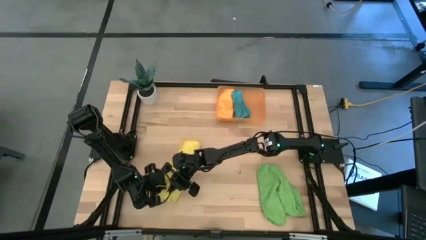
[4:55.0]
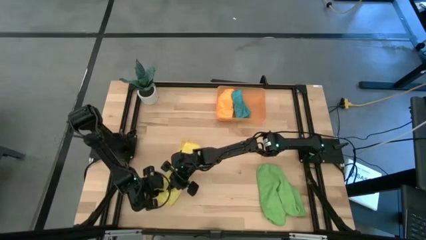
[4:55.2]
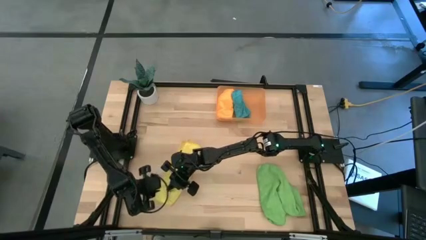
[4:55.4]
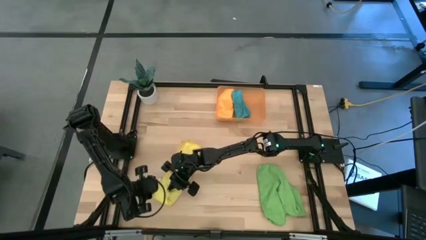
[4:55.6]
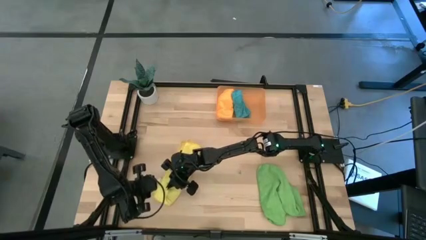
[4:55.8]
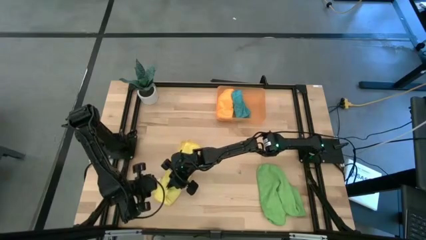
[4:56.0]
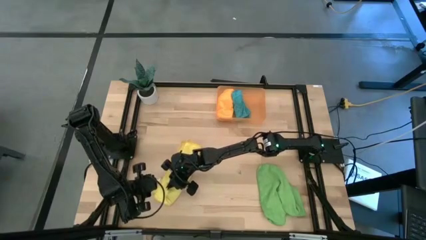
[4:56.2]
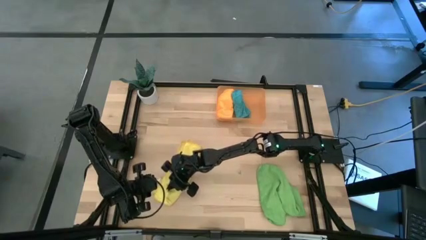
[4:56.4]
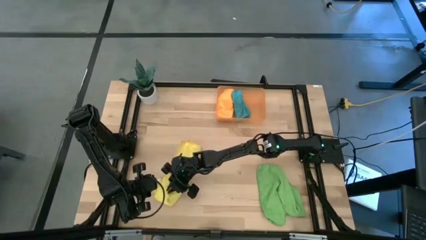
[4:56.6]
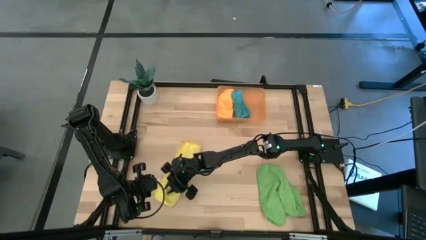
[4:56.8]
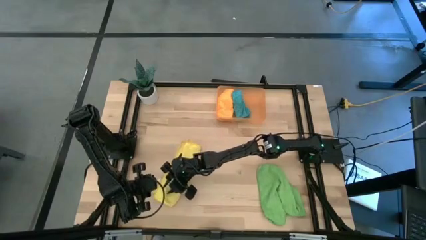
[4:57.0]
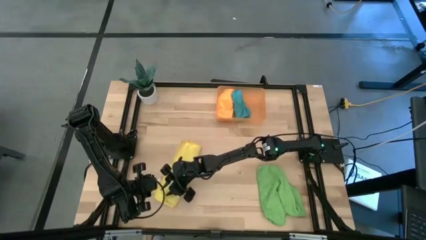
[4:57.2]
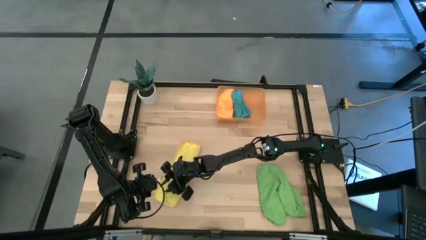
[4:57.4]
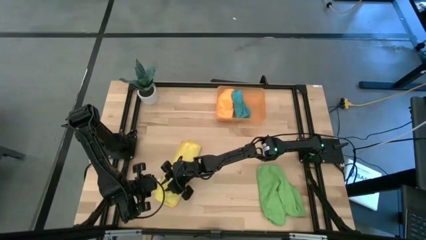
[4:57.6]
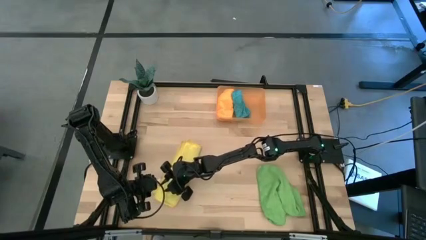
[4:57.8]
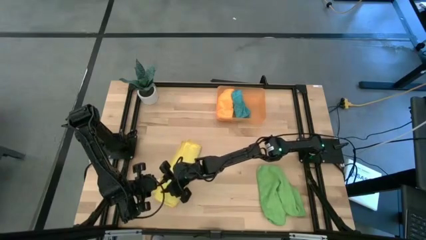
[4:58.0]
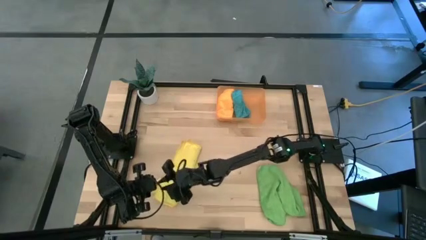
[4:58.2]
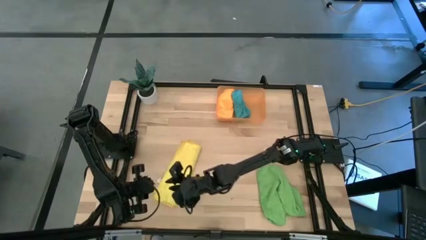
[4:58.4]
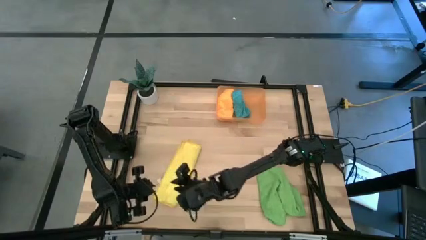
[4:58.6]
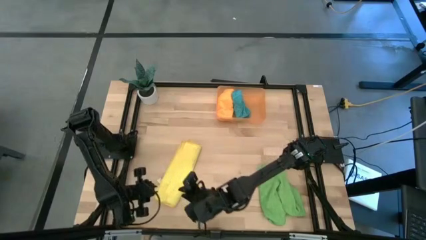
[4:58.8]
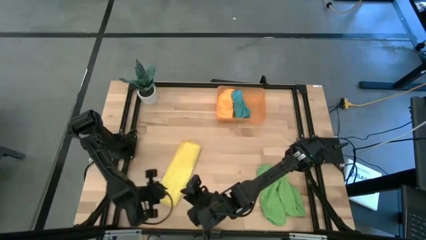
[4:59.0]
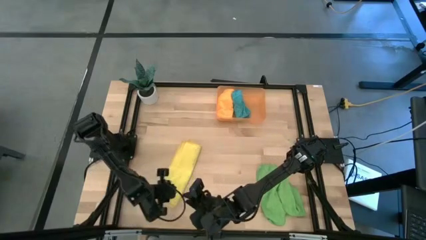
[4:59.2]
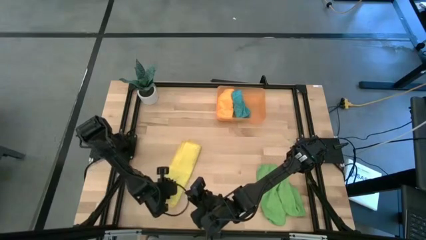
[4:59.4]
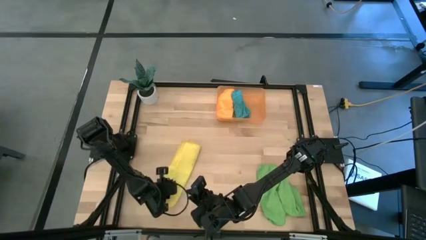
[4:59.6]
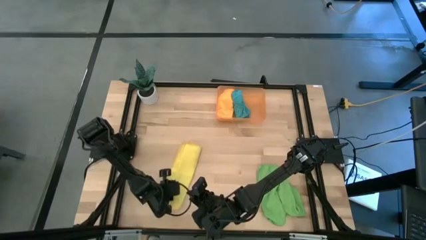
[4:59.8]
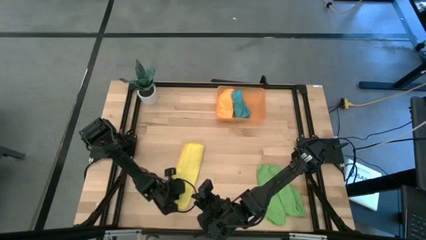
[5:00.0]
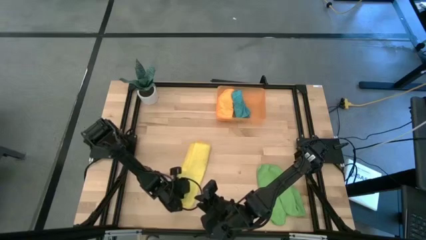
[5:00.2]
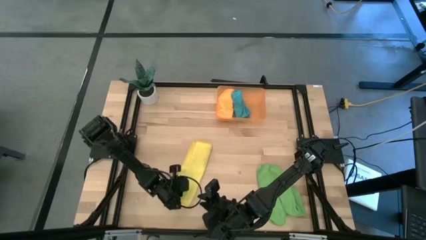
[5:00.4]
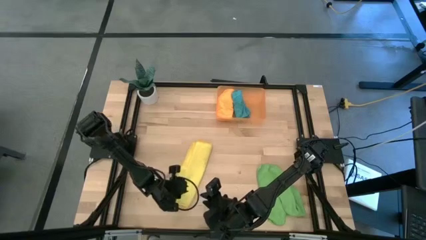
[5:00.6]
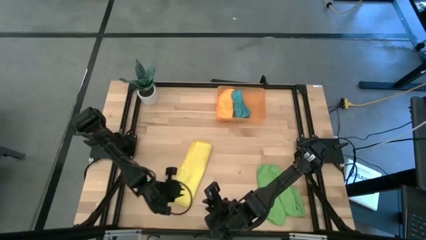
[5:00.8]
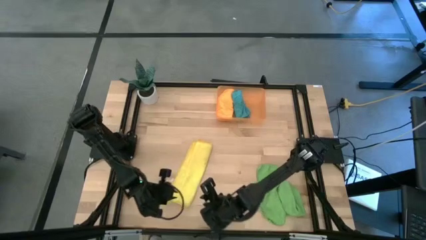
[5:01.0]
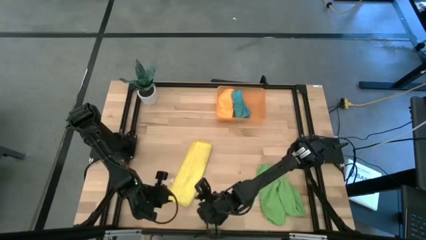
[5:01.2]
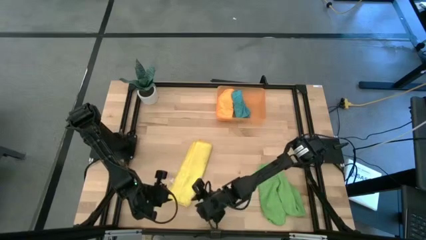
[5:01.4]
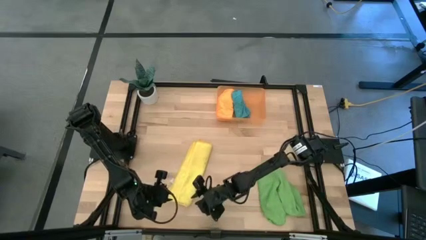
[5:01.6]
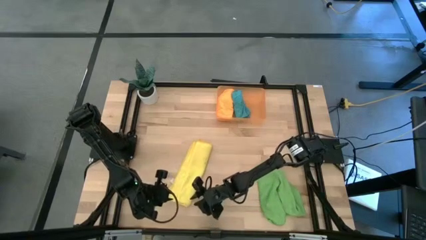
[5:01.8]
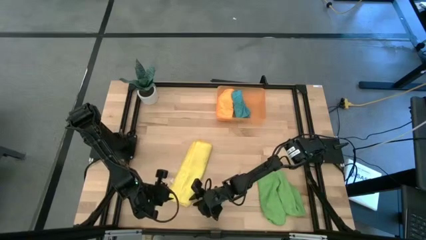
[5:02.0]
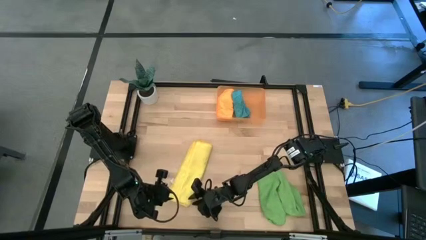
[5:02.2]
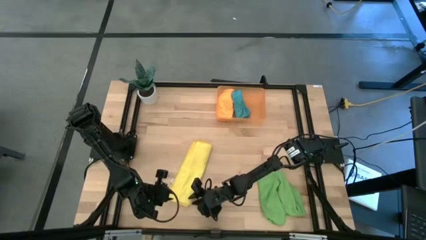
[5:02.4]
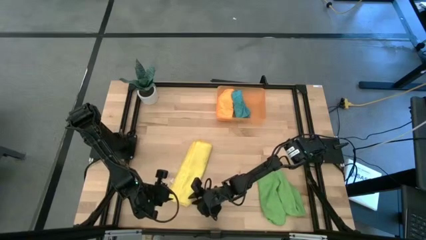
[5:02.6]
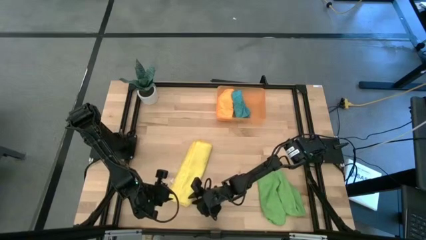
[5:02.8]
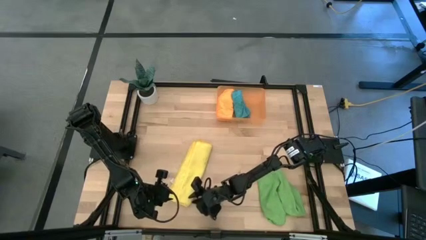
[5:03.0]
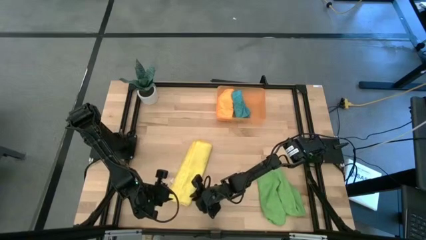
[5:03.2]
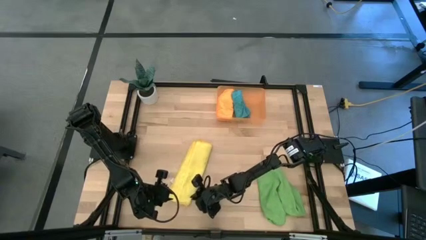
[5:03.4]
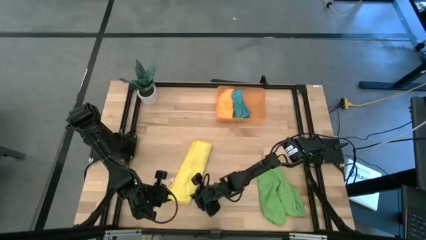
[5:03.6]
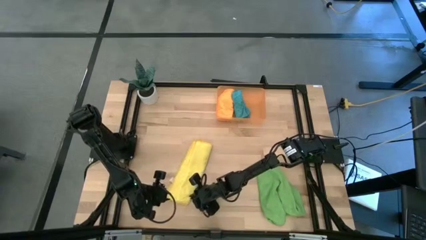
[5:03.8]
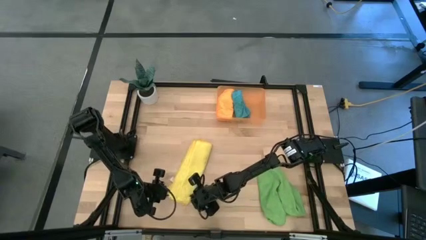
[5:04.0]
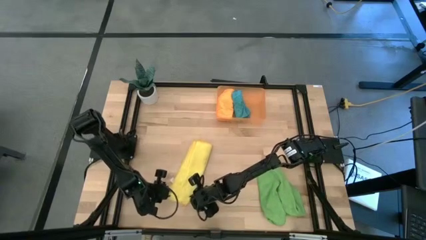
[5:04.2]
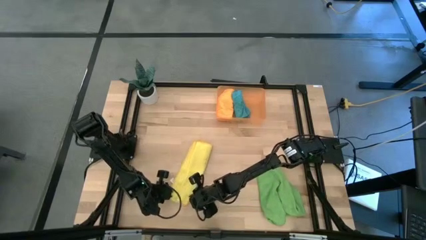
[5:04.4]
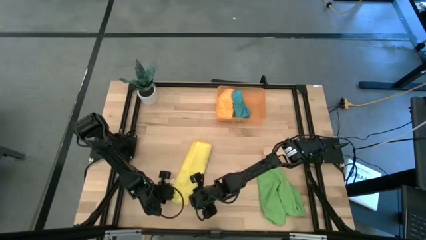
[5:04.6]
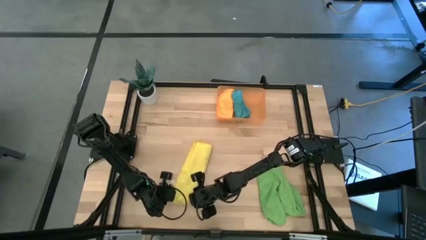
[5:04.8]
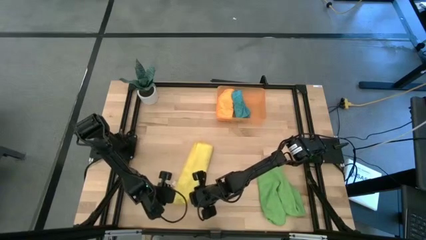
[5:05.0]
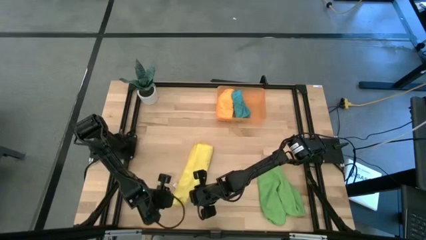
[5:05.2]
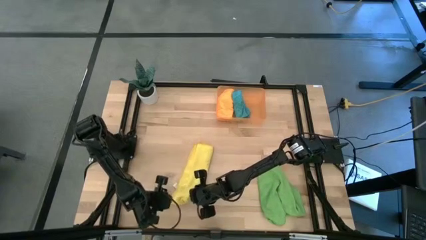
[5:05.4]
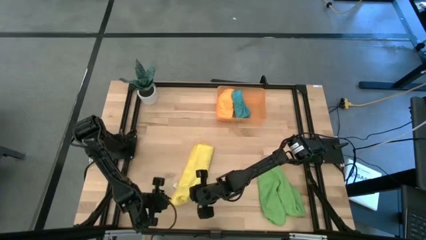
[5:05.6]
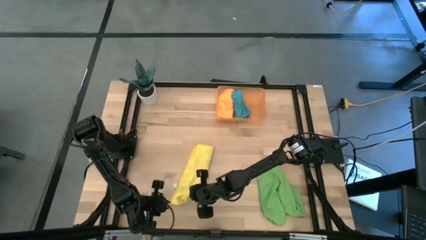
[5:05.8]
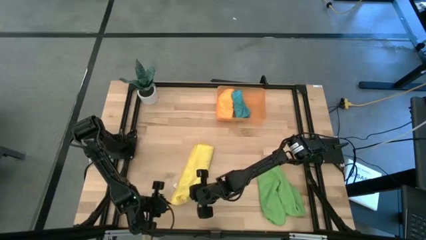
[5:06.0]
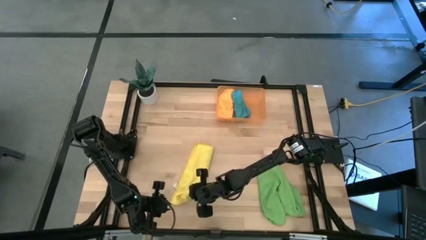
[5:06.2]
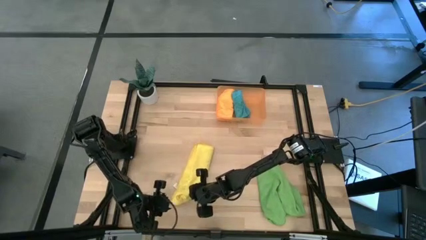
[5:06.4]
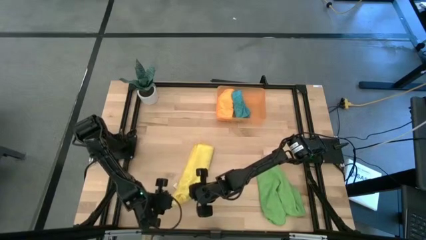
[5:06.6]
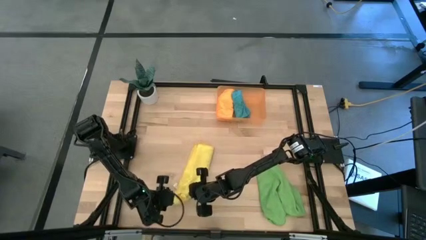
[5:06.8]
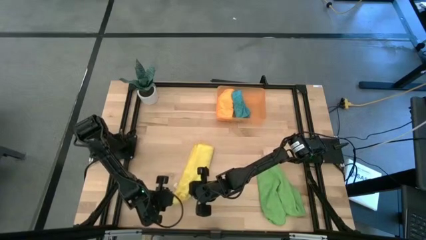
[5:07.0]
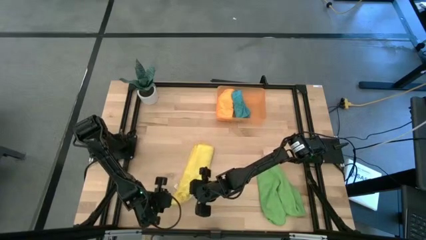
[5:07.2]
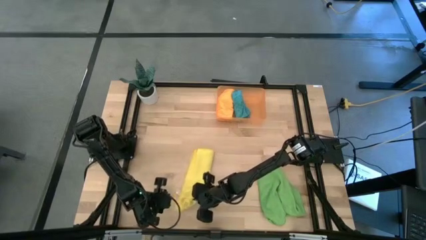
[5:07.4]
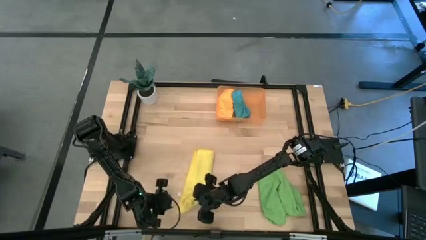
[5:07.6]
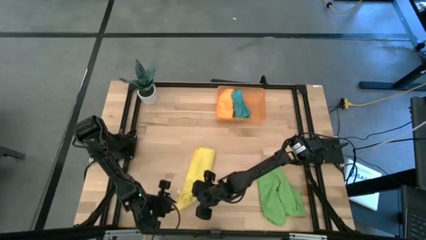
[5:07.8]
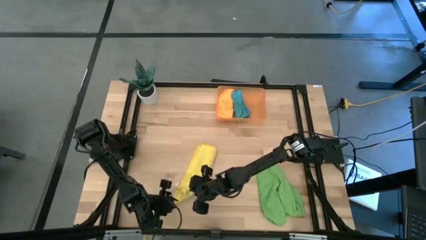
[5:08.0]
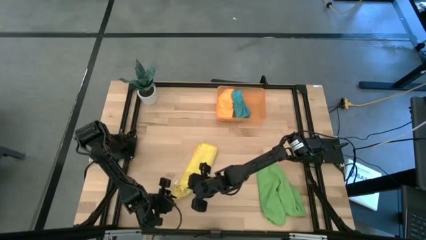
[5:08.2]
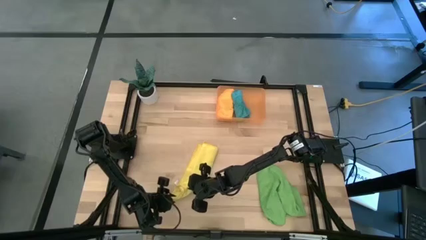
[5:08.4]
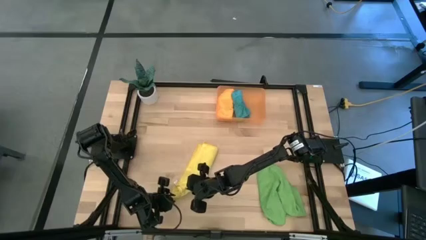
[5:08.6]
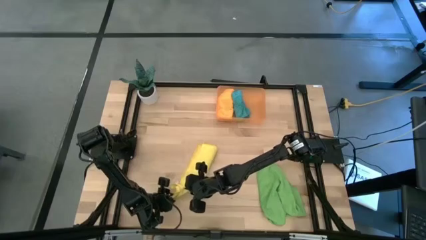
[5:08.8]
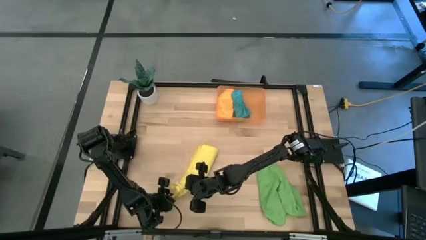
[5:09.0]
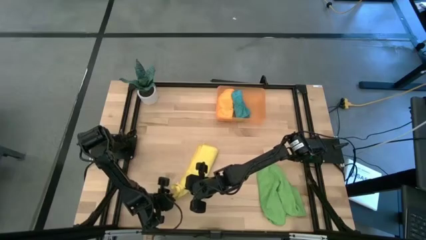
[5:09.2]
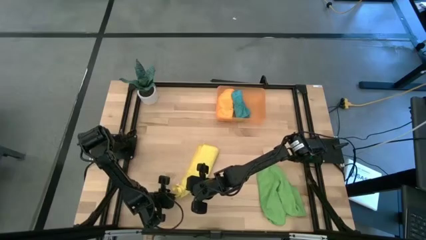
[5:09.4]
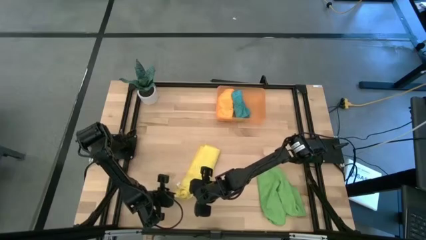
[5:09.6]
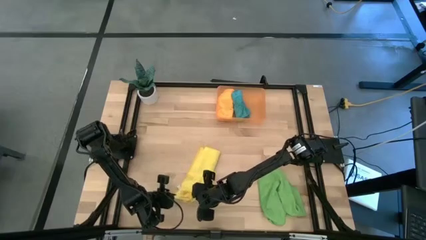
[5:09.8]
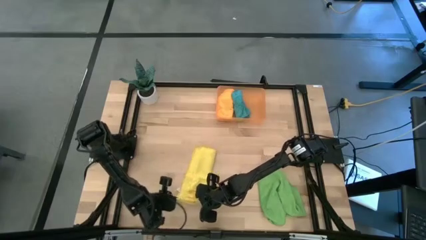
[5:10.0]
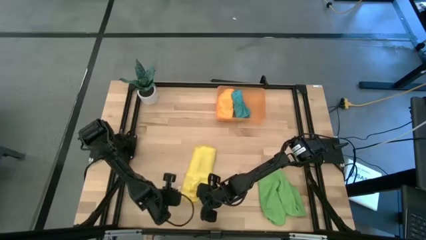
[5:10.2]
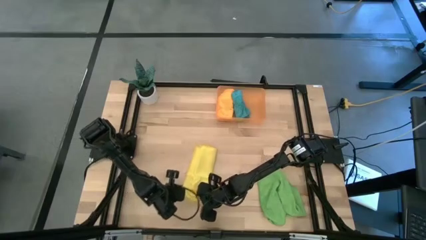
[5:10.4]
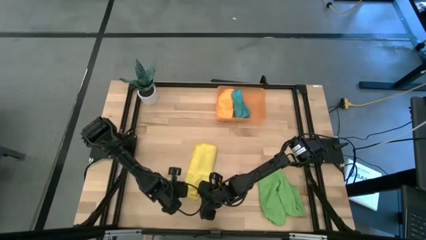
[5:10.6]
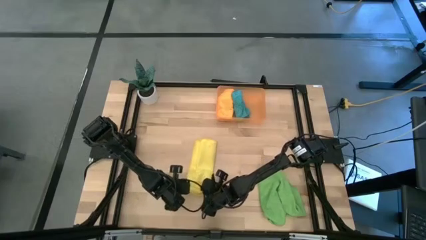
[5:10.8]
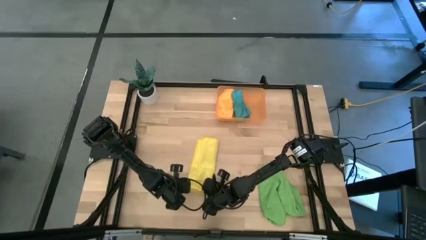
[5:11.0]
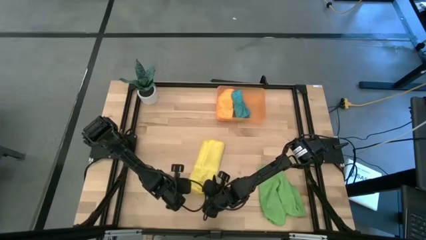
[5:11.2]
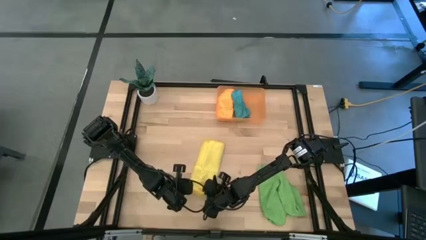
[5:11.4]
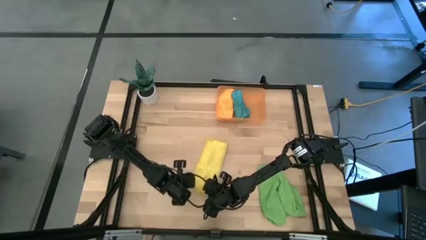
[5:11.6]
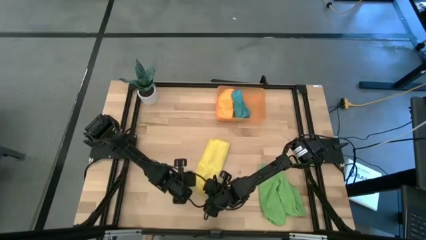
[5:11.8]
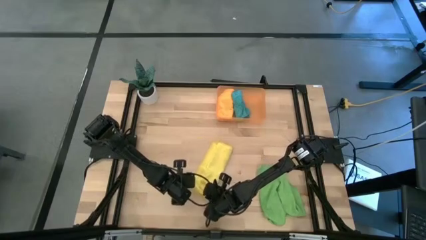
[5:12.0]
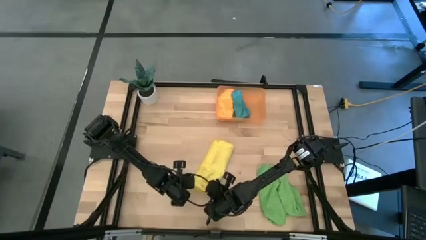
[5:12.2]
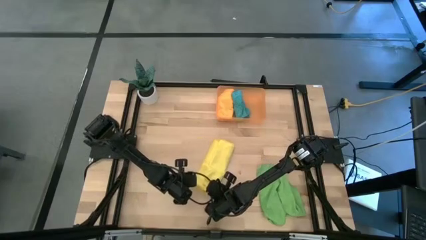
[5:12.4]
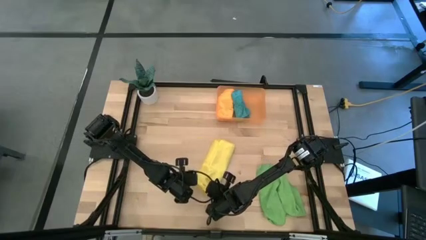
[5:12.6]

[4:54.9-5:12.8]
Task: Roll microfiber towels into tight, uniform cylinder then place into a basket
Roll the yellow microfiber towel
